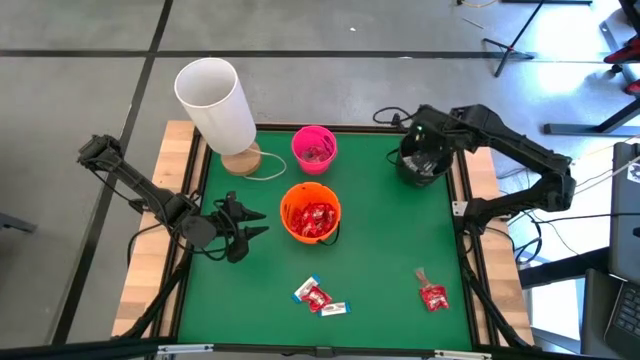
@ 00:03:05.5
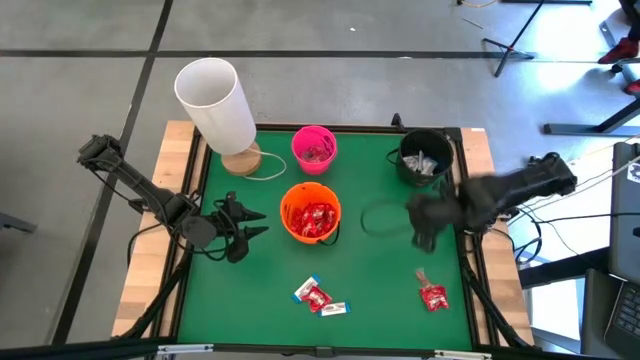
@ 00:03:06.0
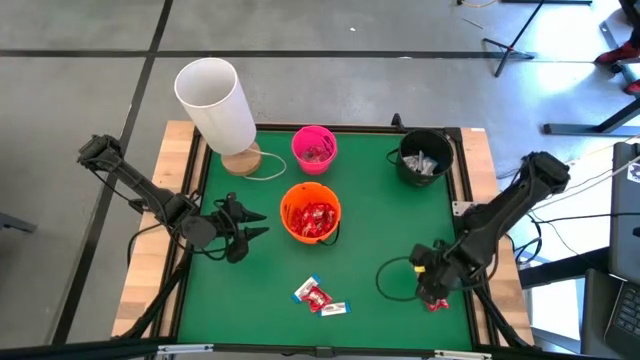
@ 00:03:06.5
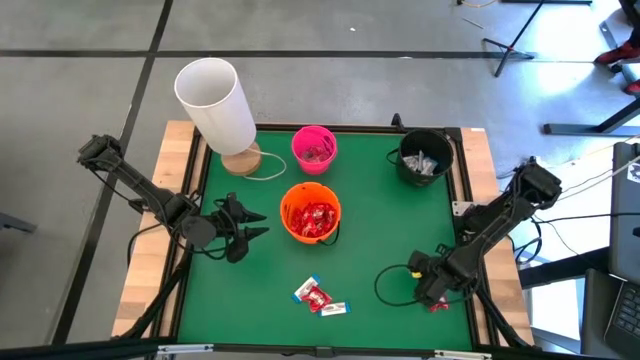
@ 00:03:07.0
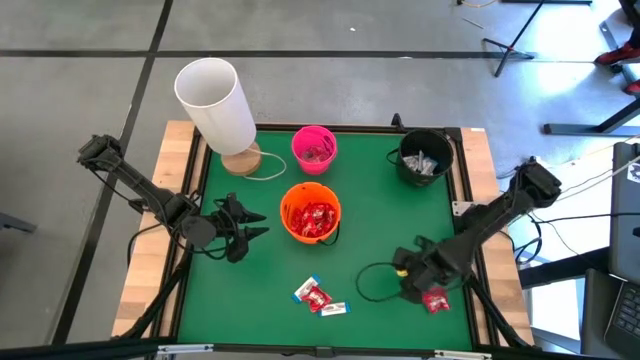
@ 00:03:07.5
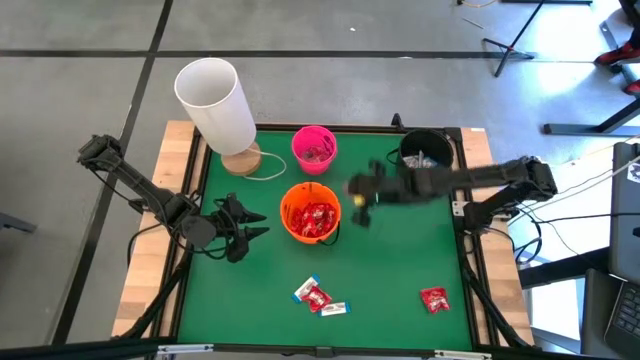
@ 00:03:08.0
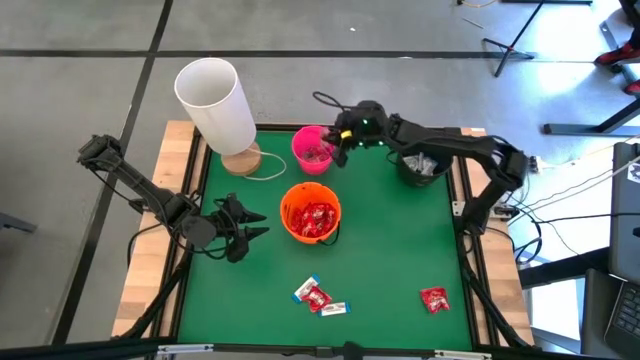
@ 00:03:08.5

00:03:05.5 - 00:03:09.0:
Task: Sort candy
Put the orange candy into the pink bucket

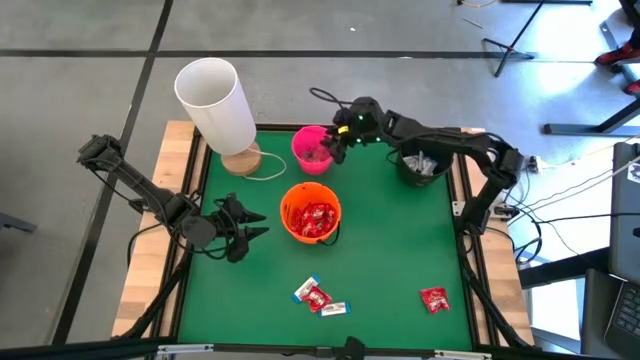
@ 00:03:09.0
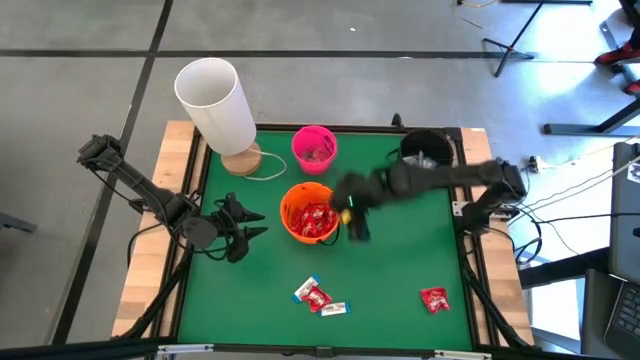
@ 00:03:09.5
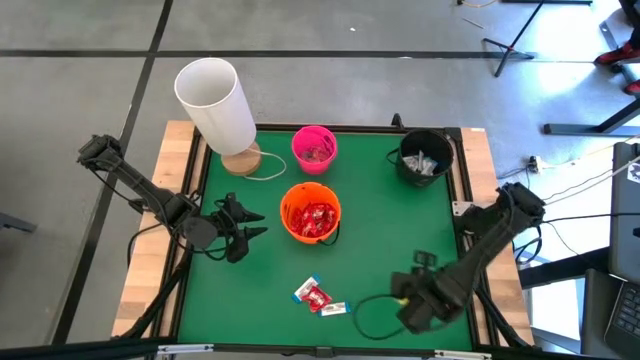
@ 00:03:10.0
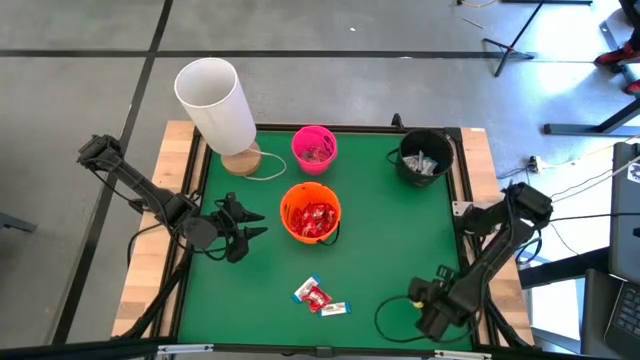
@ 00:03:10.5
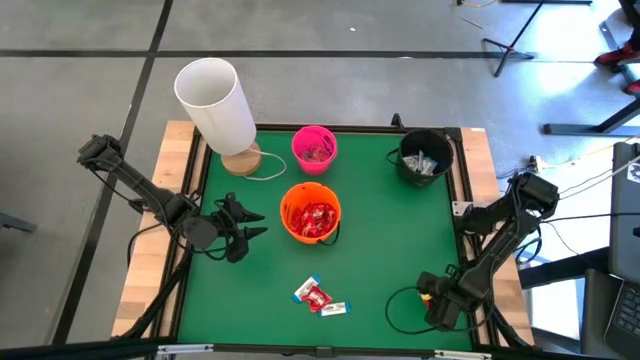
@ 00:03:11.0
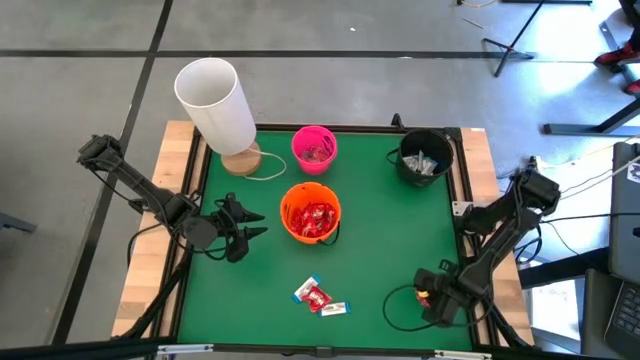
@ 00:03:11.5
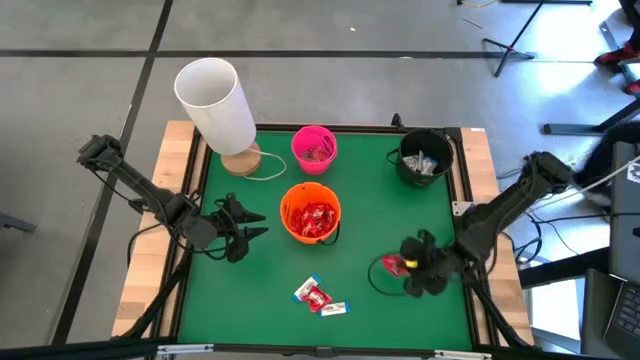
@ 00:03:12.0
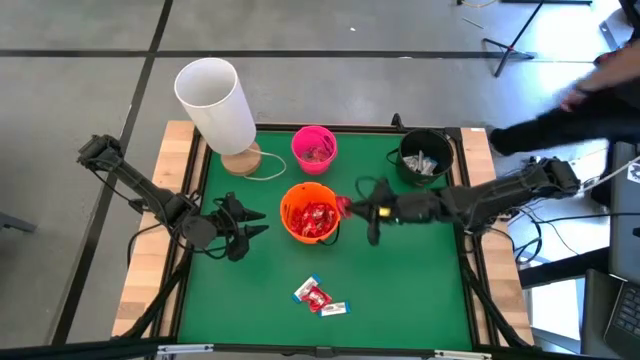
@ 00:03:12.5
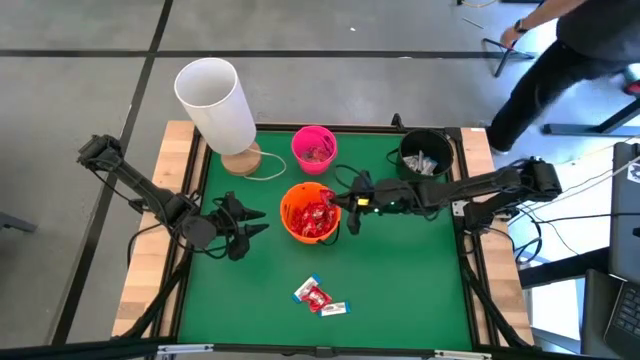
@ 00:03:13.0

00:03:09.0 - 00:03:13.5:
Put the red candy into the orange bucket

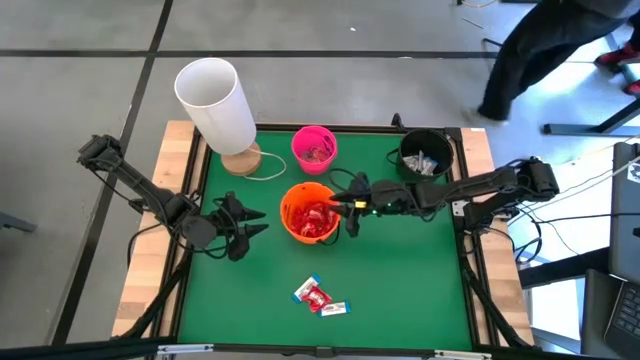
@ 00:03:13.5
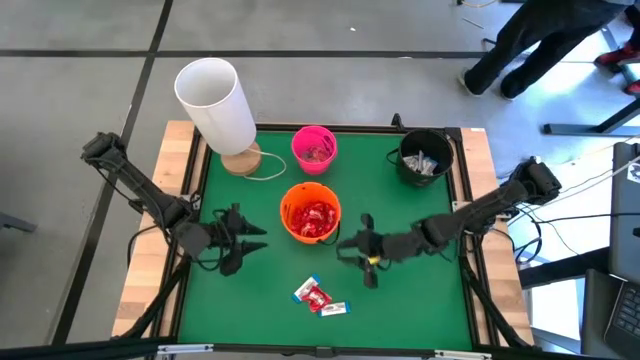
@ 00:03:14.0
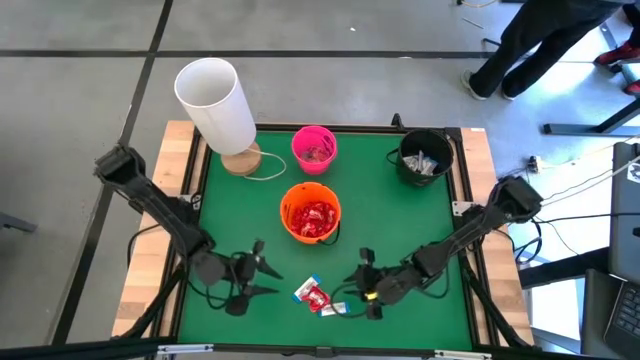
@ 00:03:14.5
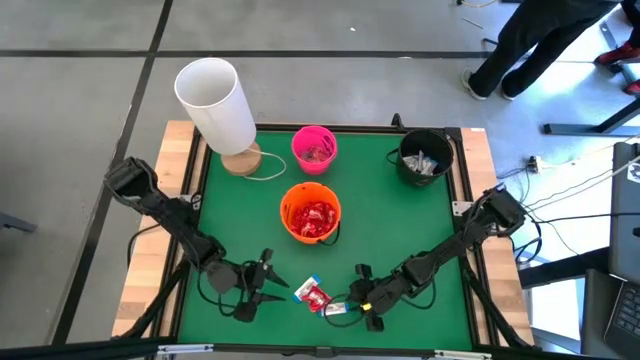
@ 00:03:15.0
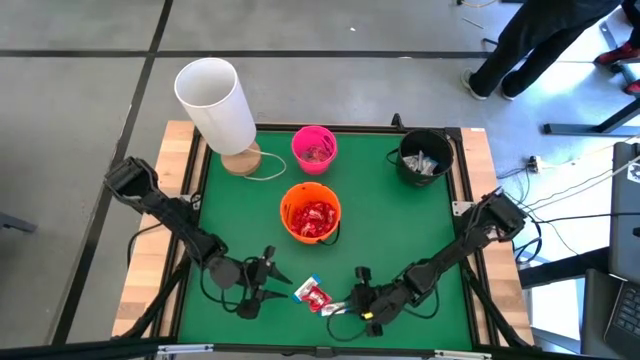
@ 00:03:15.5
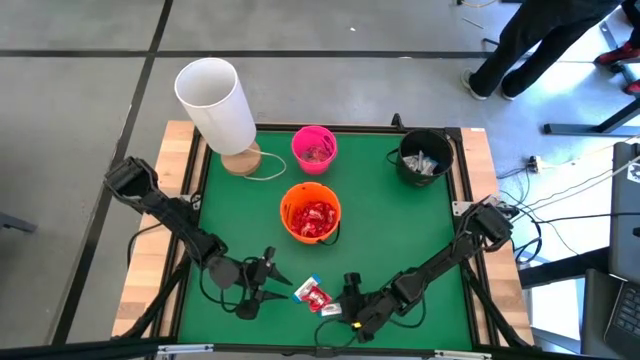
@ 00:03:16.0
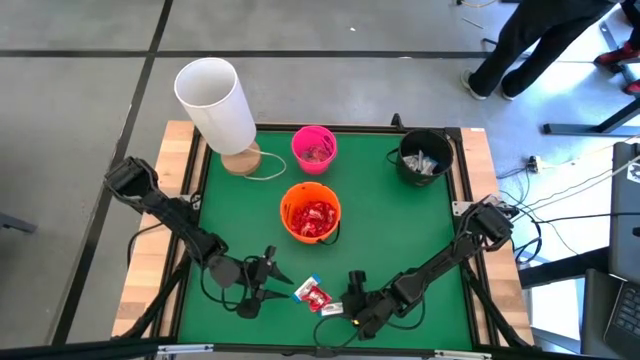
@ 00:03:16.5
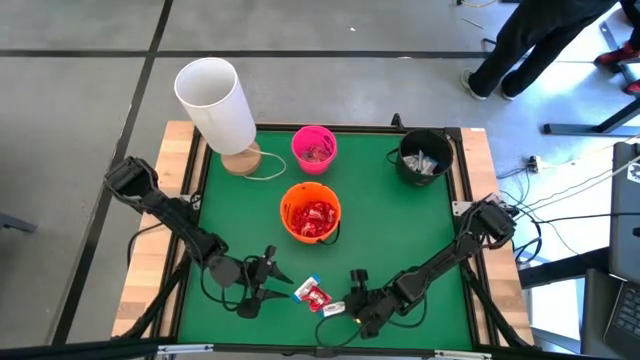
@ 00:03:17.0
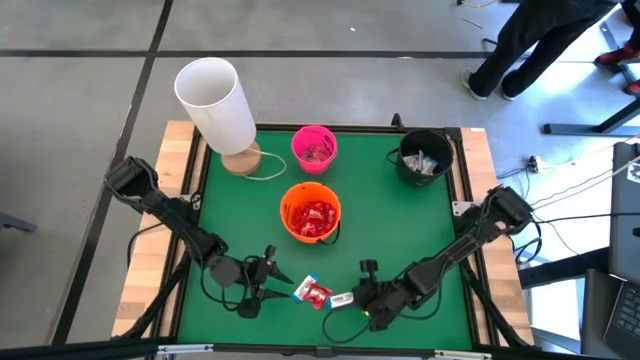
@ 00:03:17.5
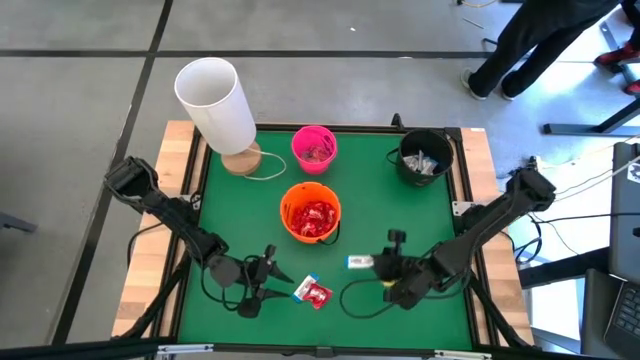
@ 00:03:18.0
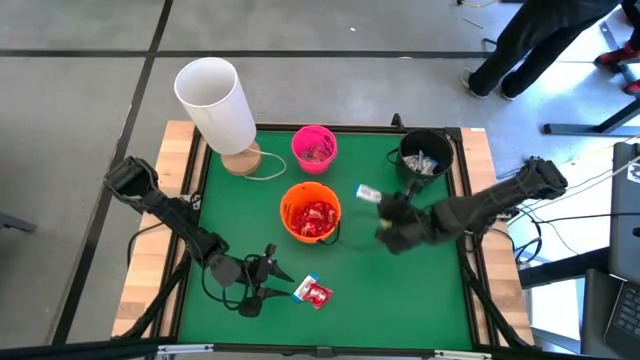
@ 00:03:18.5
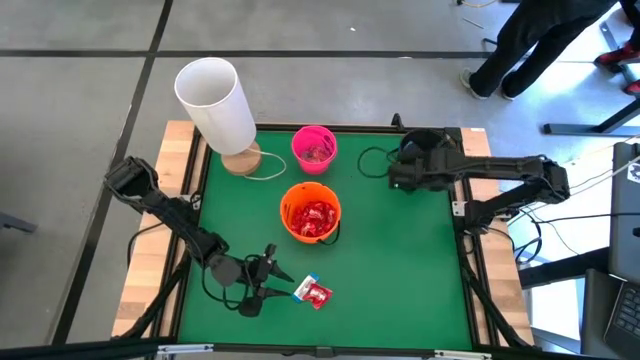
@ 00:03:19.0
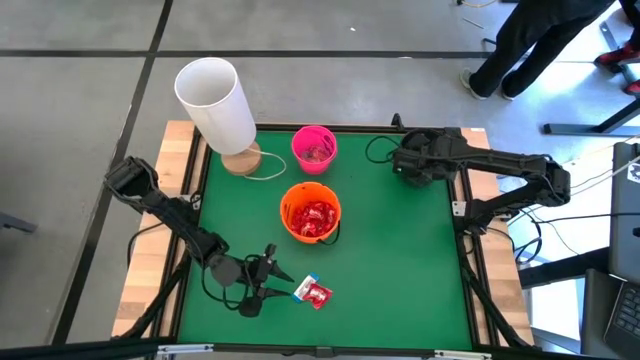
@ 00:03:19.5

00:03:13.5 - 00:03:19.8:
Put the white candy into the black bucket

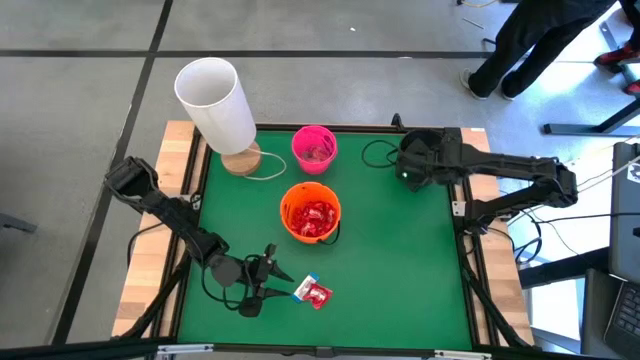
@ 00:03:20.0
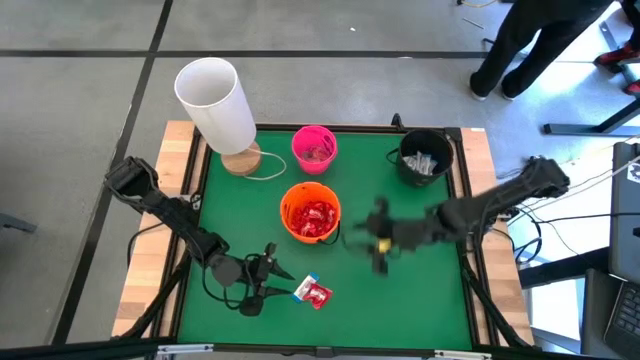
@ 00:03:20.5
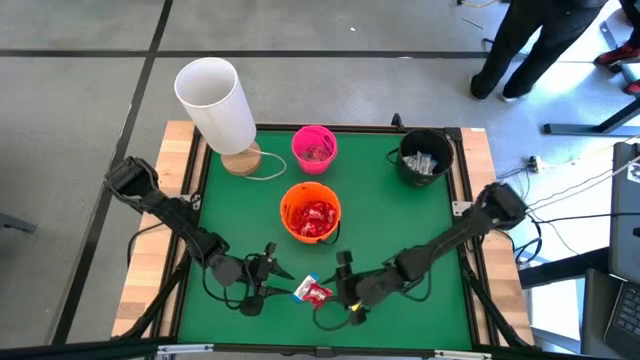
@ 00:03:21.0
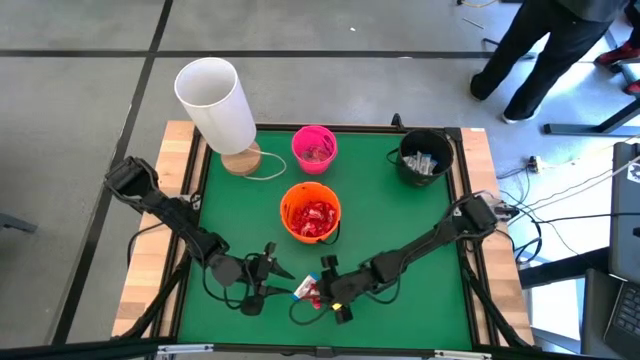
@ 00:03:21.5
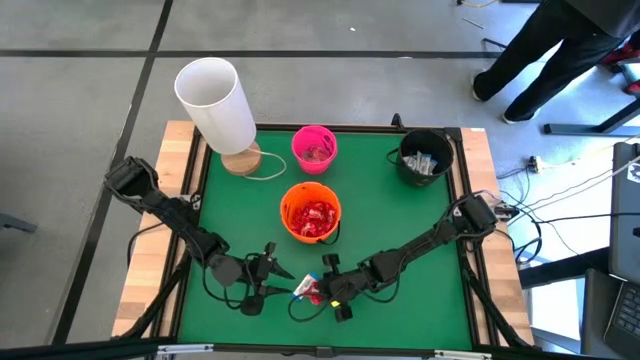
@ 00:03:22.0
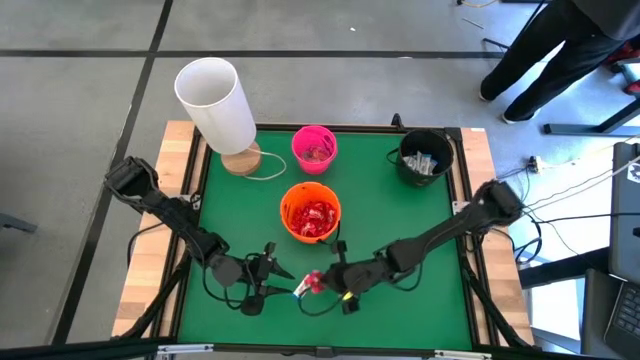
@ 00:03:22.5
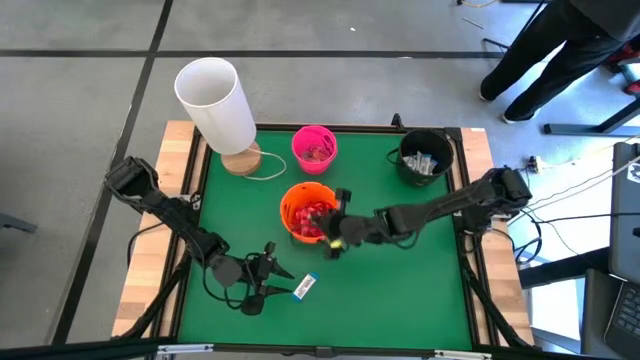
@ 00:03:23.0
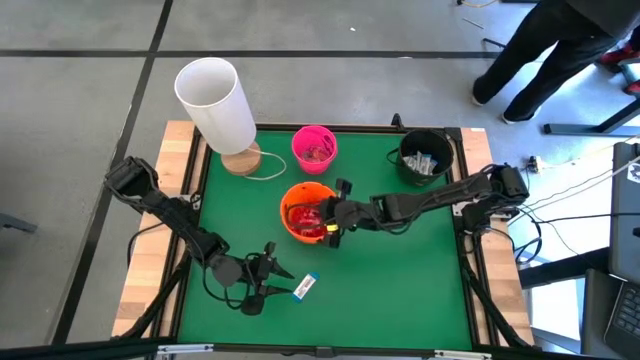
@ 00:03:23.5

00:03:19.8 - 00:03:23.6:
Put the red candy into the orange bucket

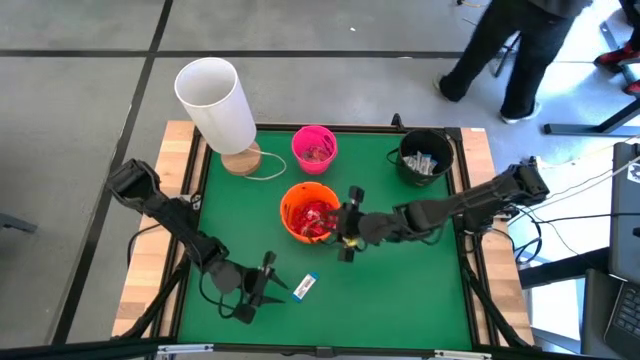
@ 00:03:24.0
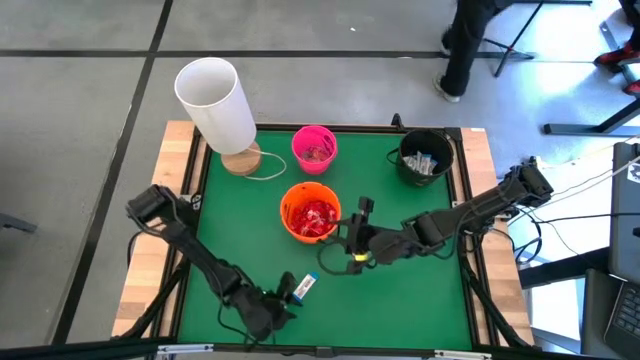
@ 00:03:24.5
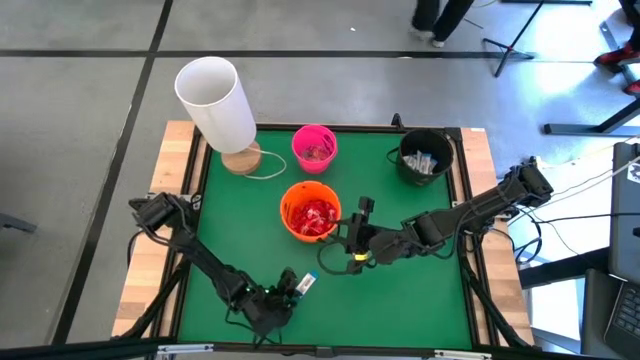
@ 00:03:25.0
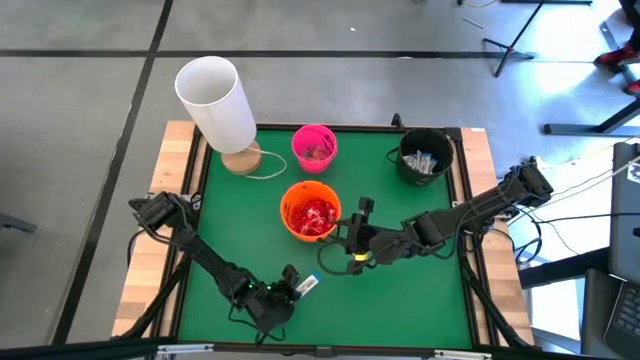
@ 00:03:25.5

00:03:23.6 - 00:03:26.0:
Put the white candy into the black bucket
